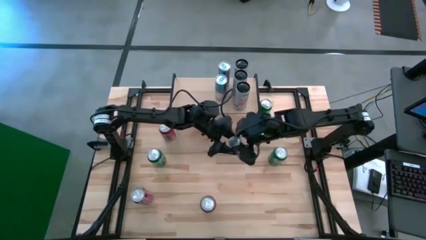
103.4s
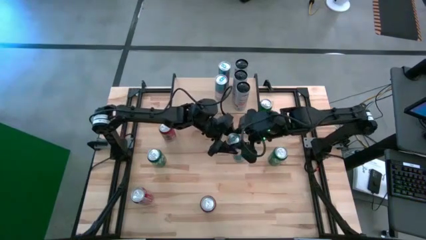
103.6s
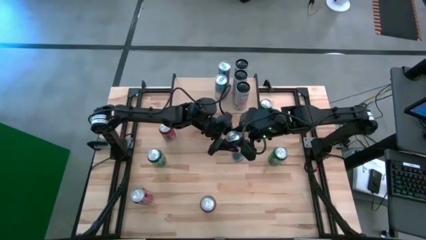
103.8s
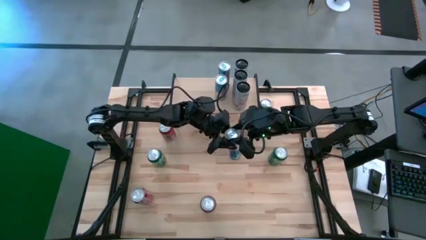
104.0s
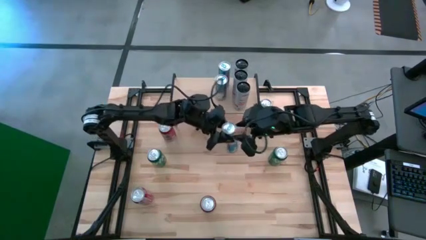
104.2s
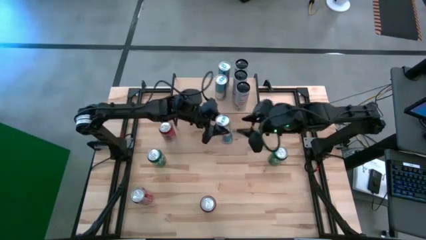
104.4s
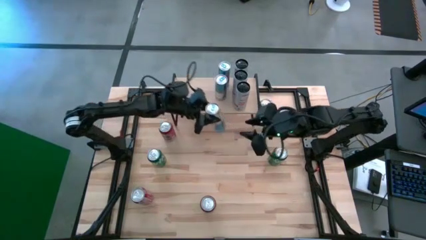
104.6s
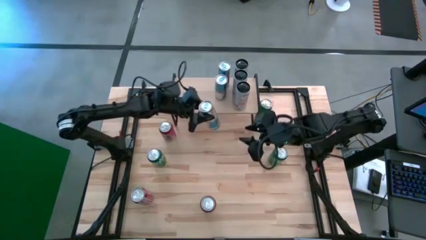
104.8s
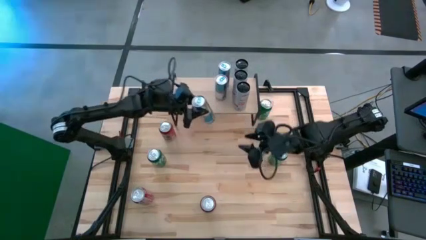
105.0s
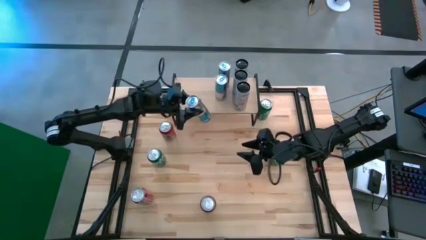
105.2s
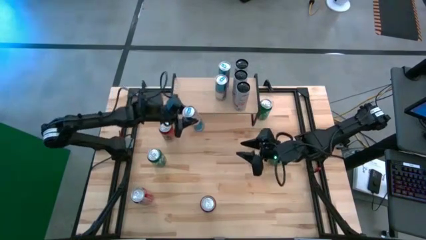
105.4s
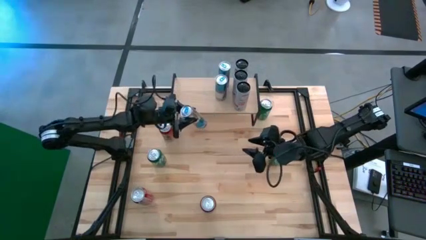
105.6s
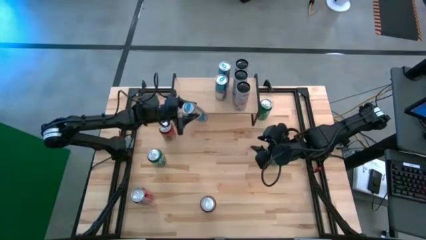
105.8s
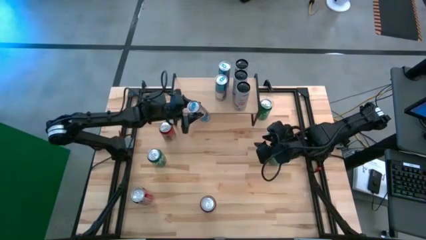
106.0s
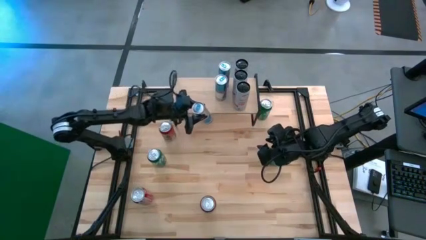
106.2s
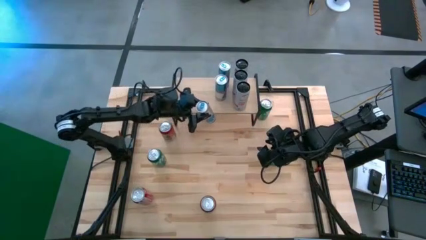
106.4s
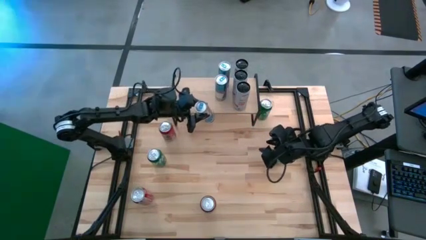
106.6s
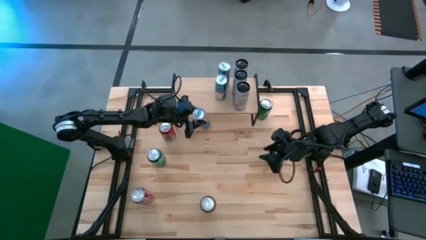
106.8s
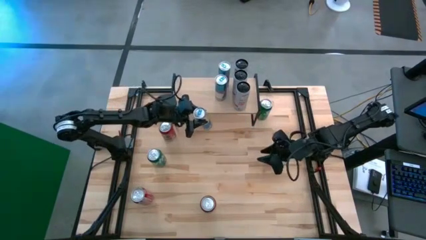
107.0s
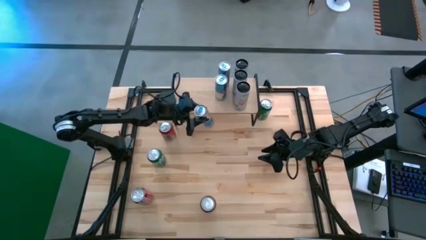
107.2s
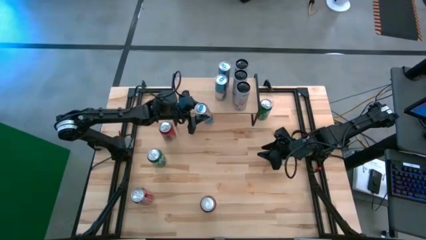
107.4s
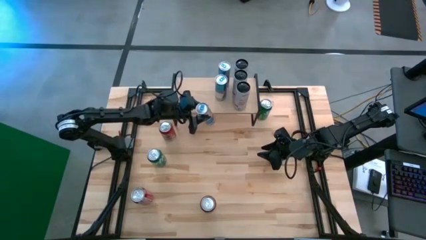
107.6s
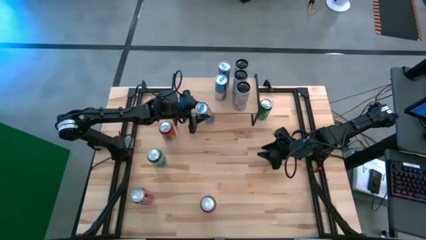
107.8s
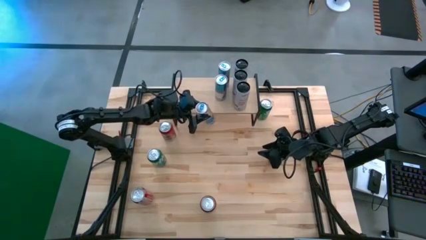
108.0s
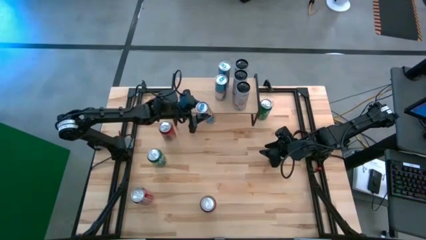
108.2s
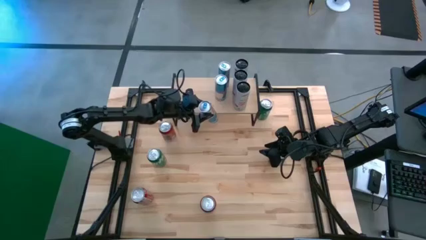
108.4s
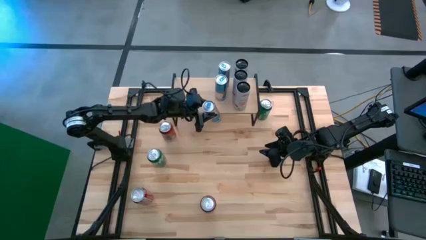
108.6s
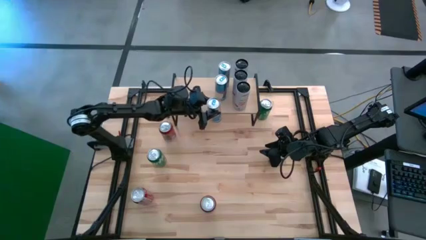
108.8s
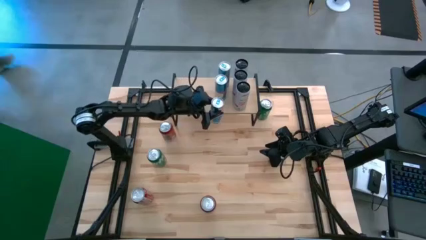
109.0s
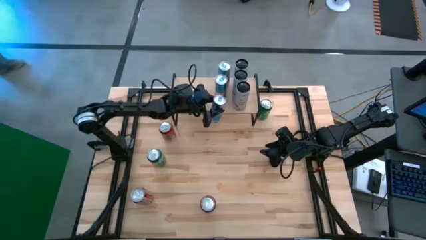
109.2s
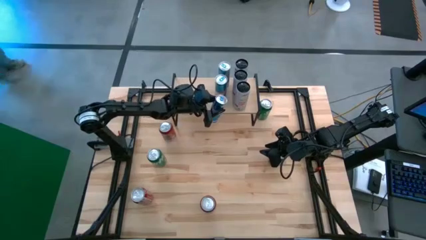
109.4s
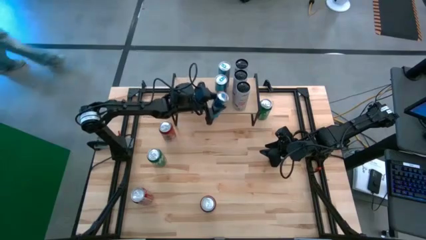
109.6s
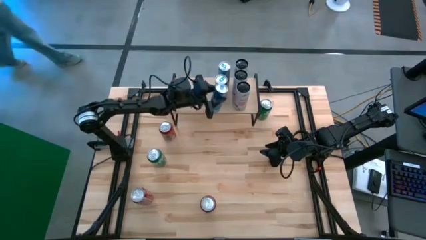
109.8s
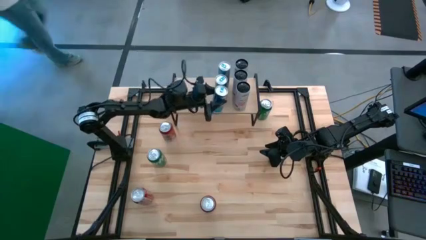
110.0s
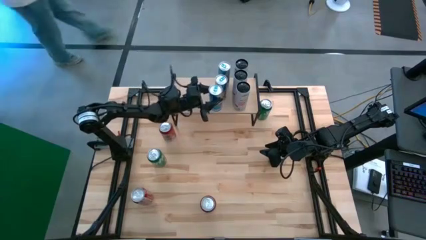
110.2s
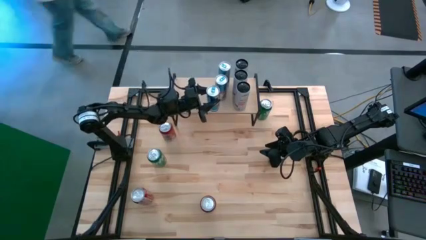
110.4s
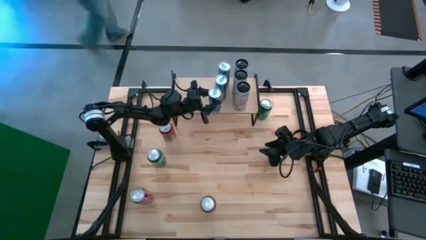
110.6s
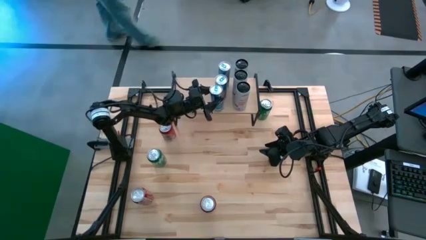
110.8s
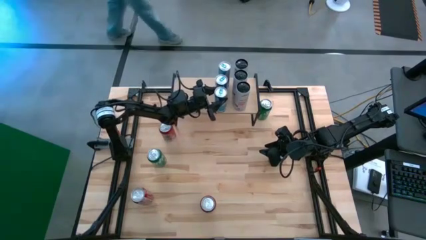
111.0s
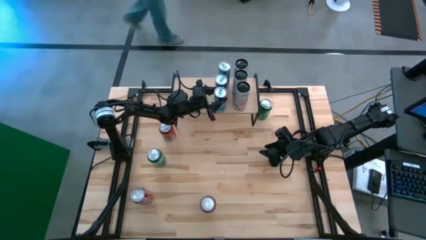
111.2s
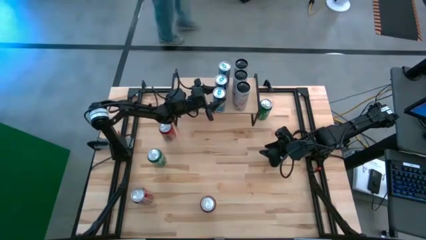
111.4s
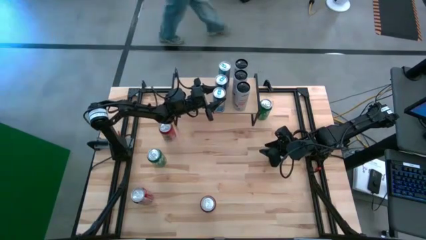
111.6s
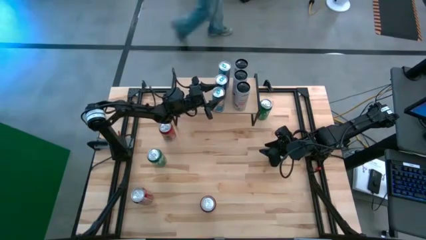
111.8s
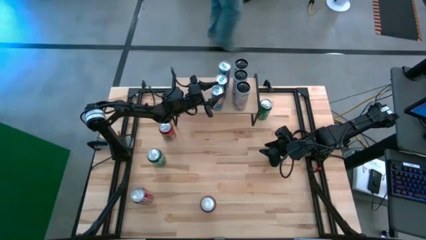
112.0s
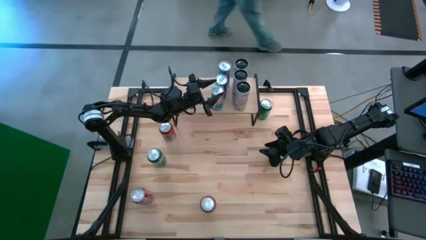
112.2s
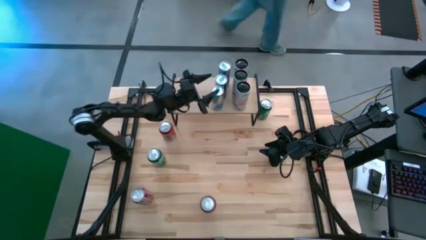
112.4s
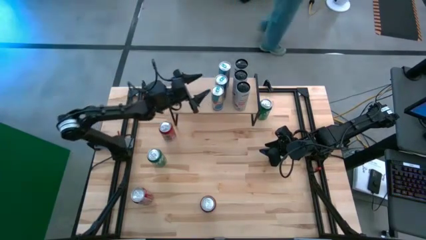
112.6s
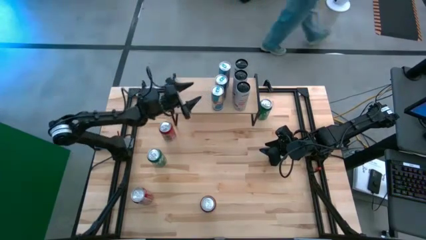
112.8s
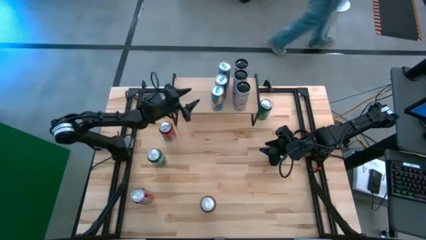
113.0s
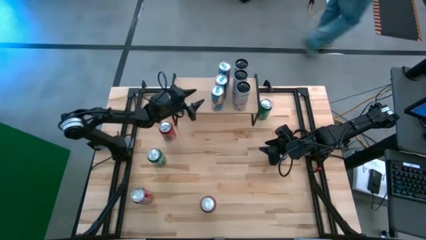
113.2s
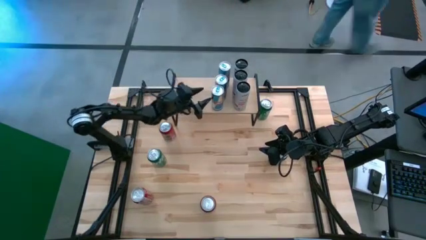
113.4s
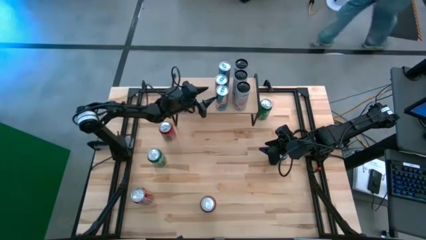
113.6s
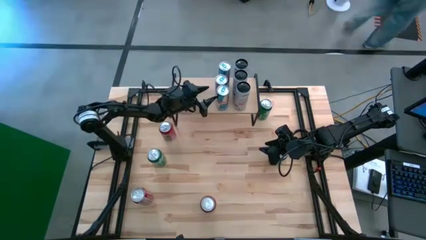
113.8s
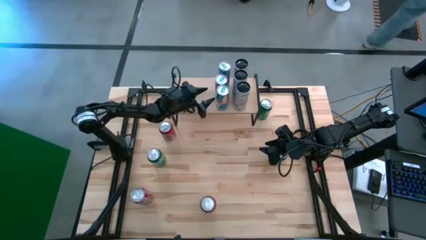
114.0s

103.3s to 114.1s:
Task: Place canned beverage on shelf
Put the blue soda can on the shelf aligned with the other blue soda can

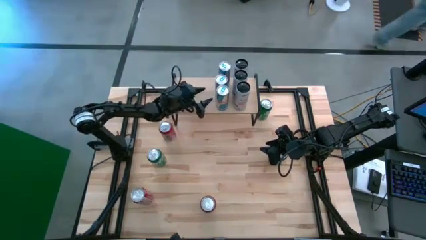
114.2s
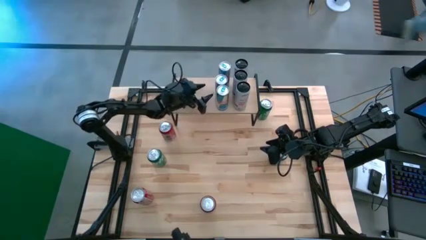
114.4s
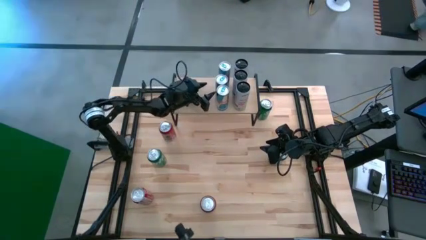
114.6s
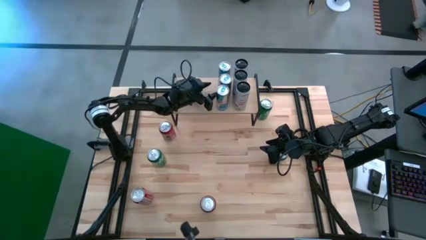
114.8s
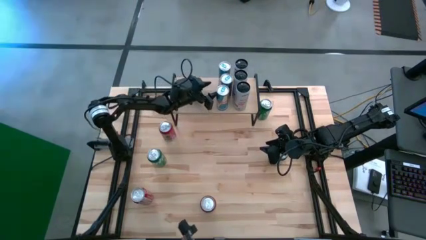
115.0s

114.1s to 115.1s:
Adjust the blue soda can on the shelf
